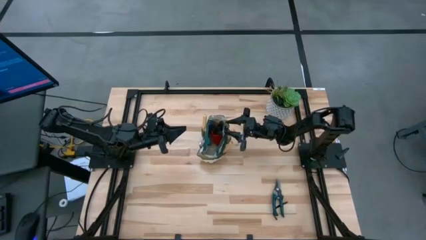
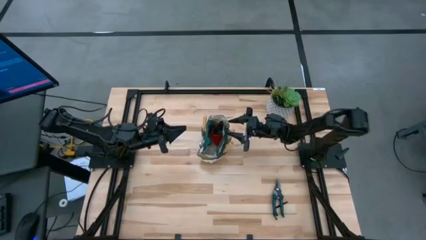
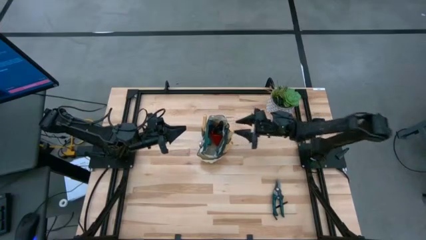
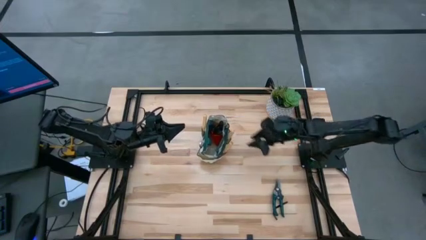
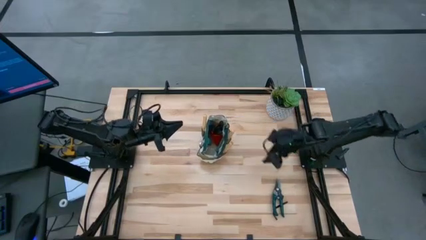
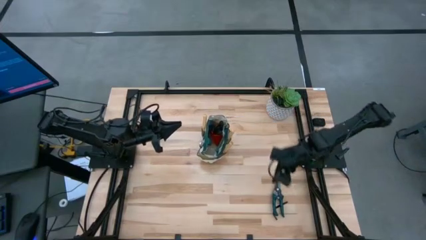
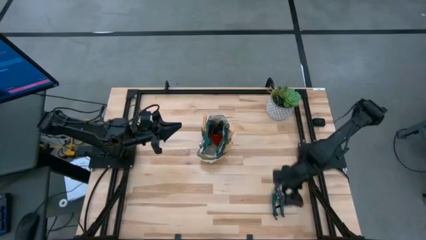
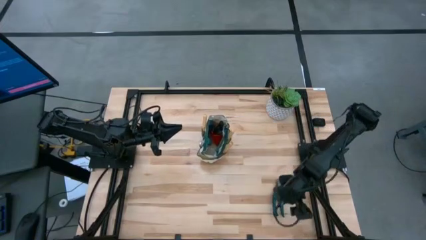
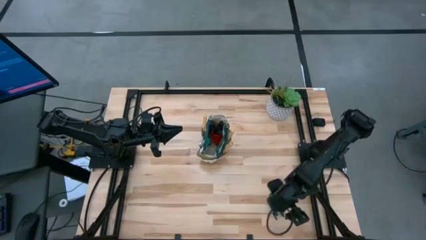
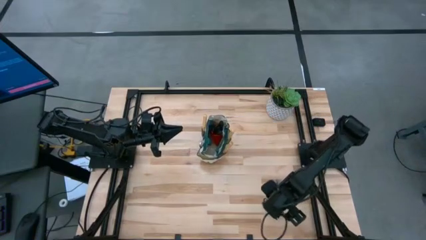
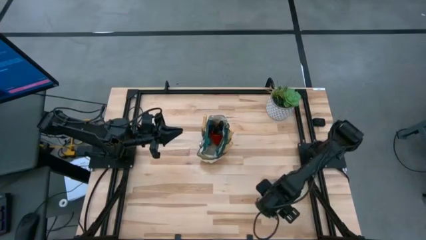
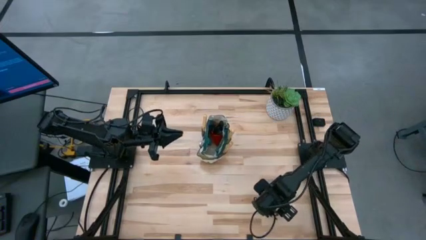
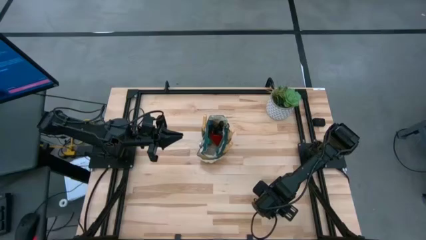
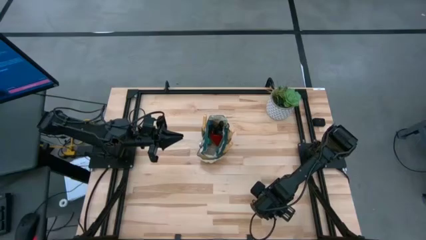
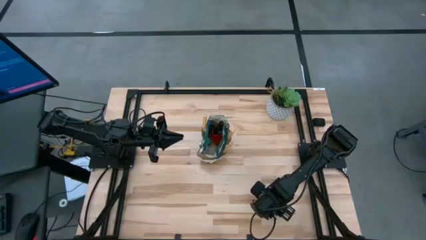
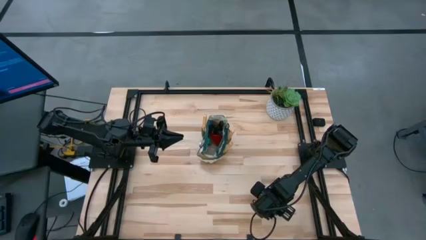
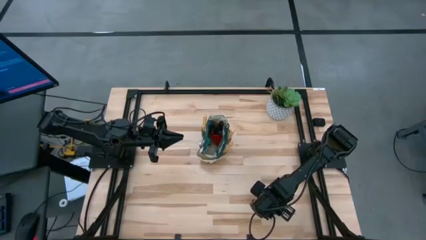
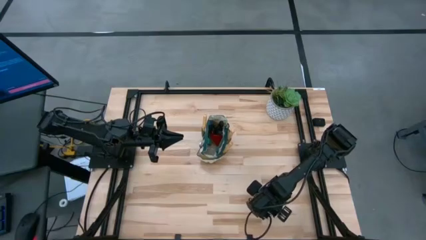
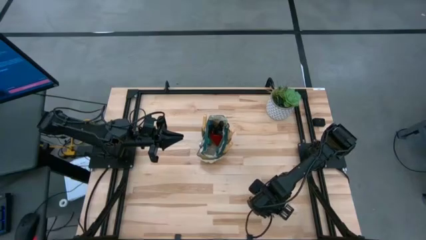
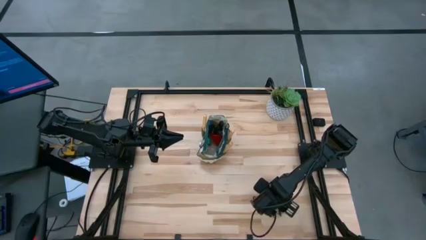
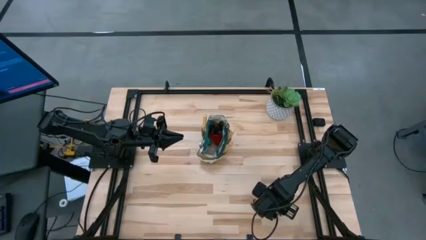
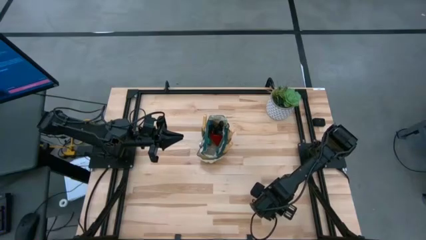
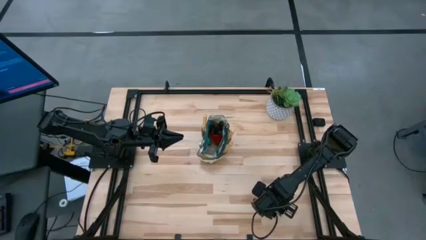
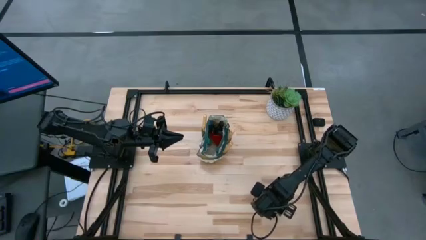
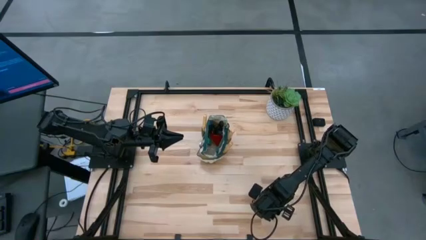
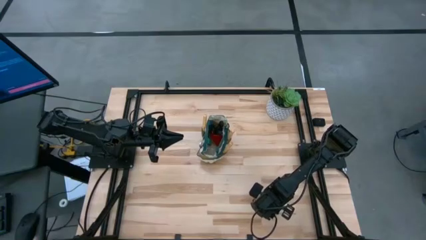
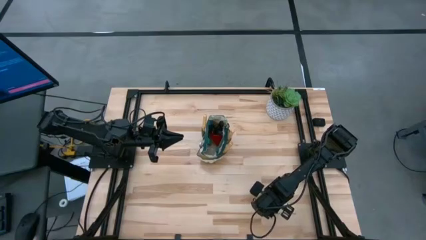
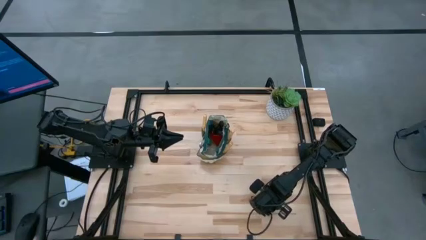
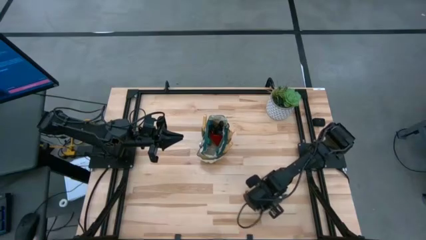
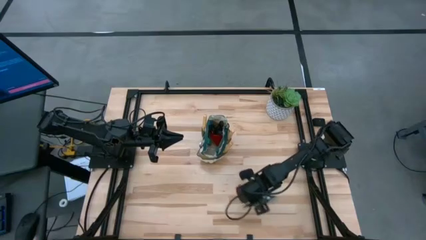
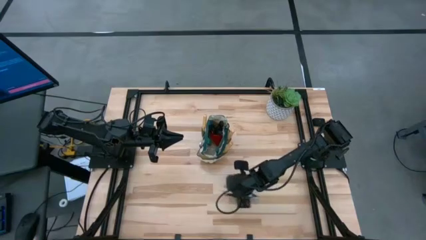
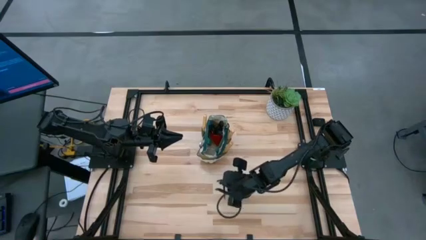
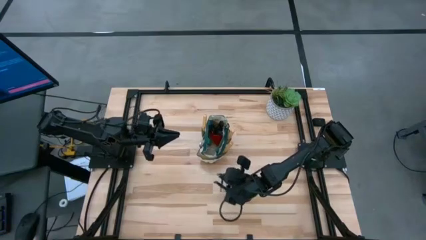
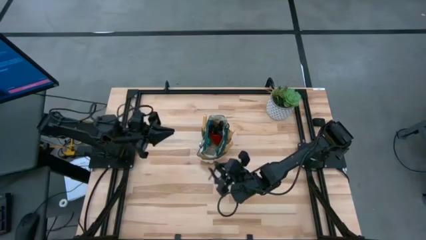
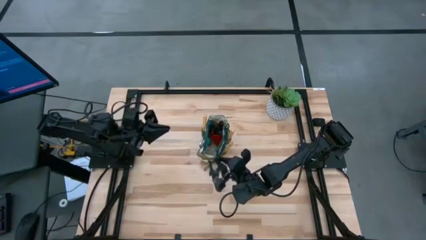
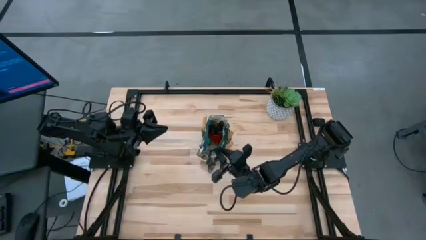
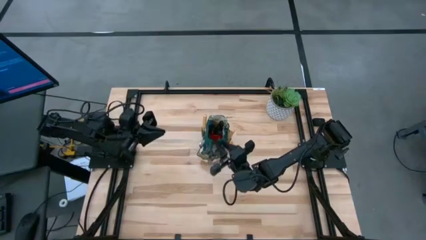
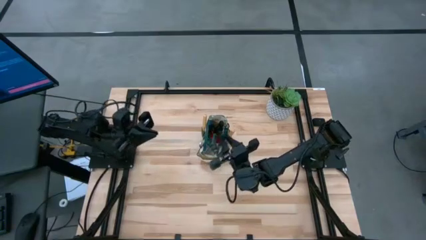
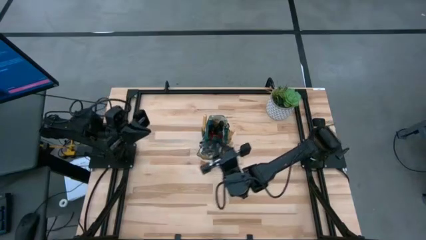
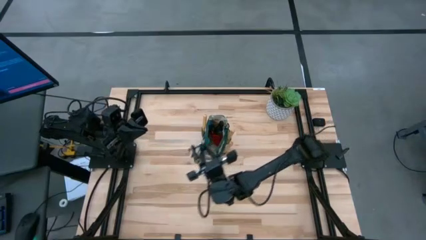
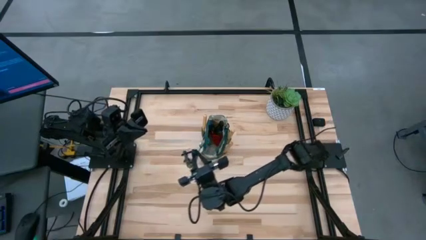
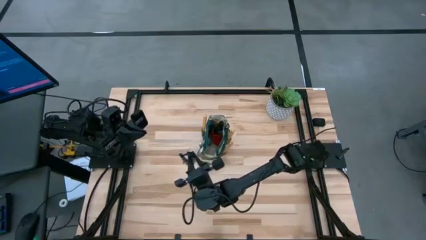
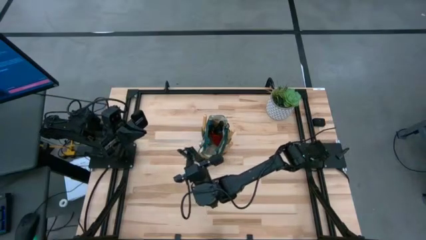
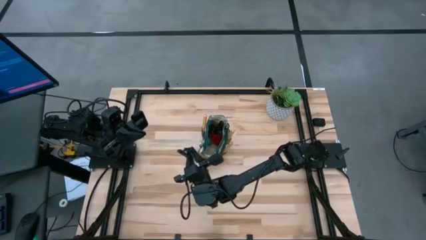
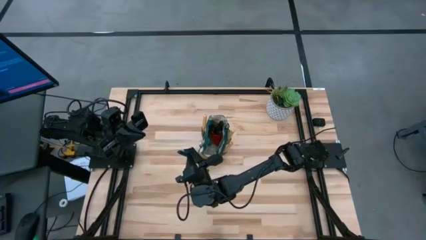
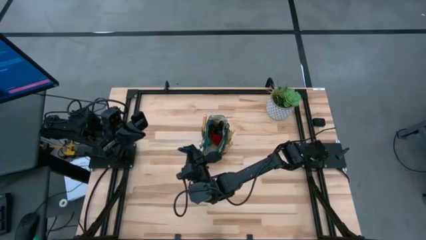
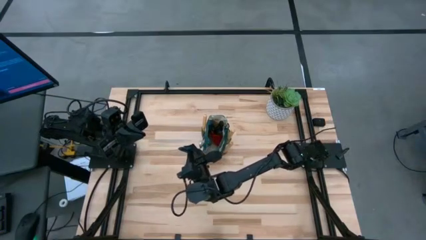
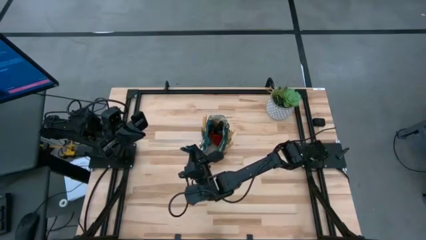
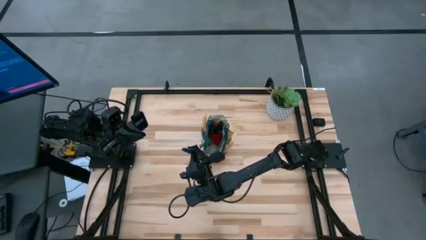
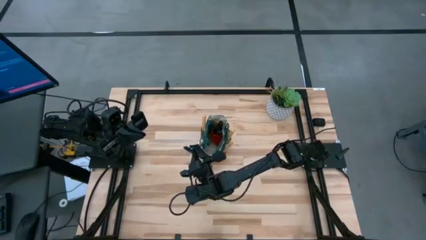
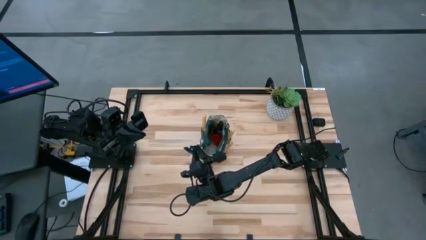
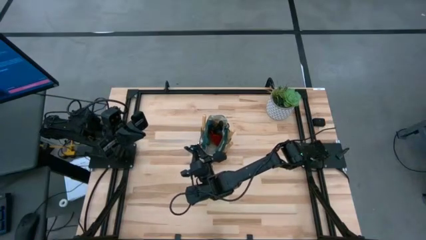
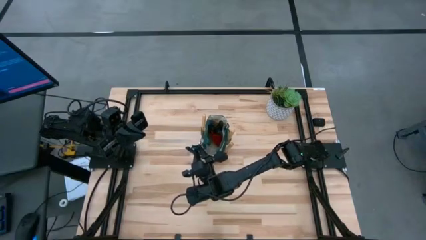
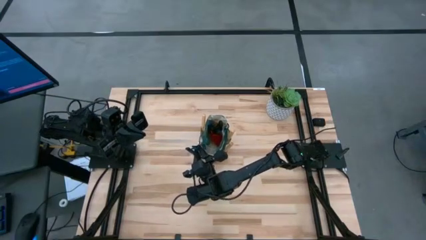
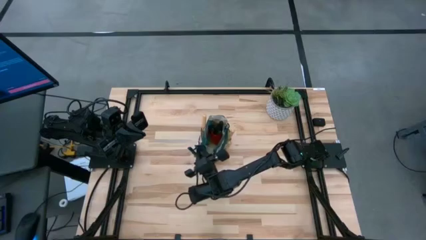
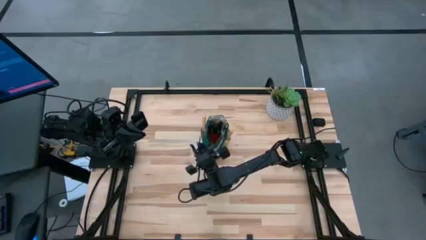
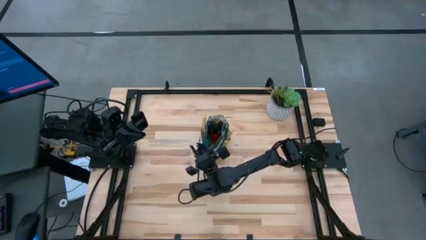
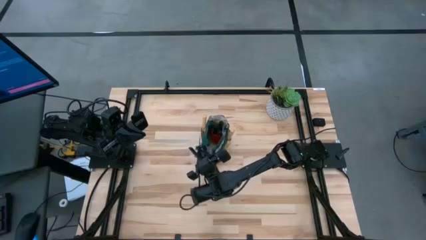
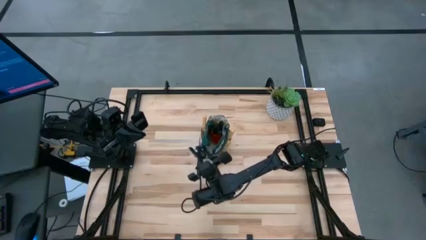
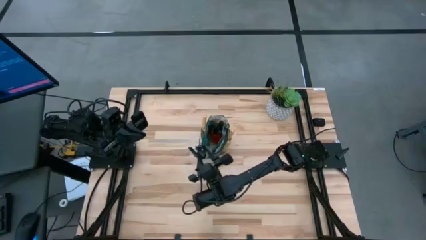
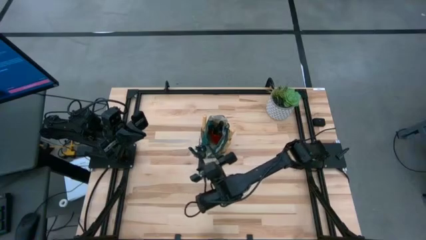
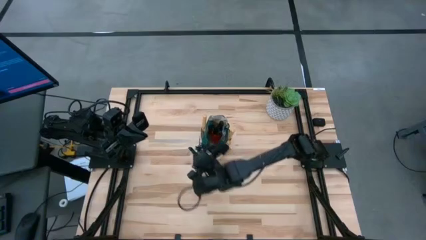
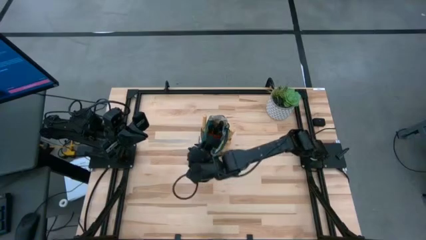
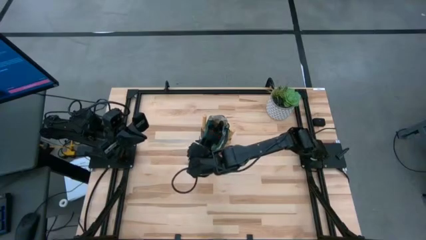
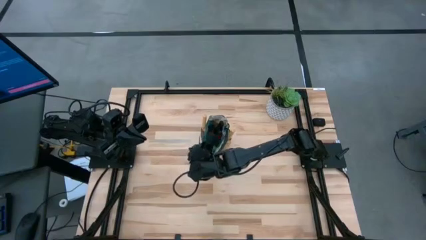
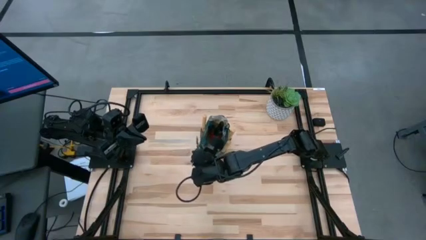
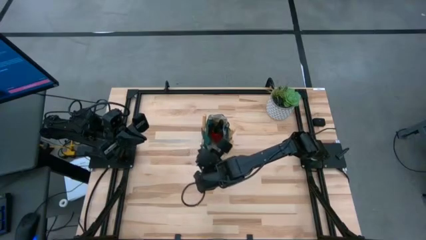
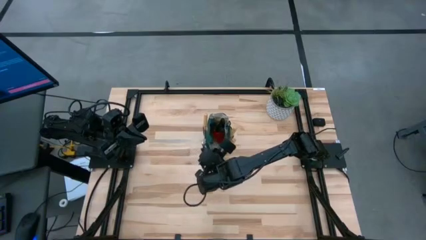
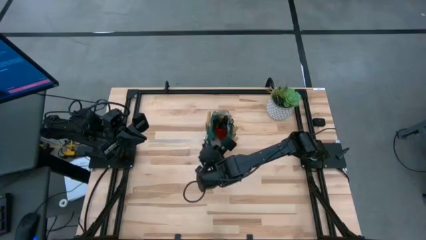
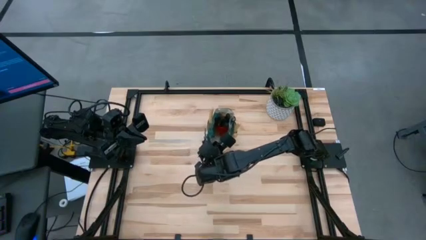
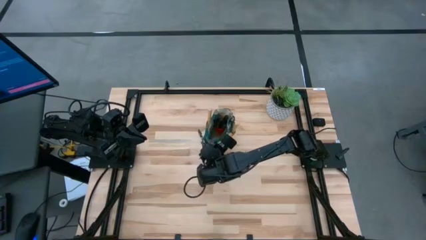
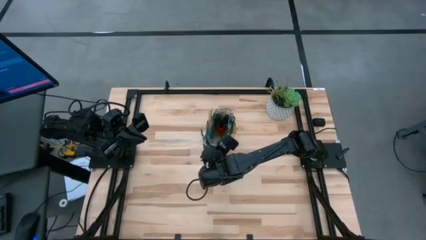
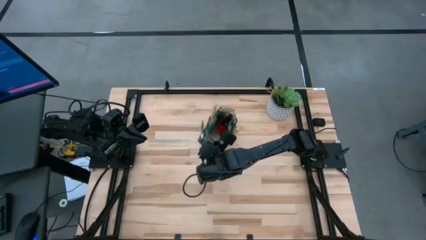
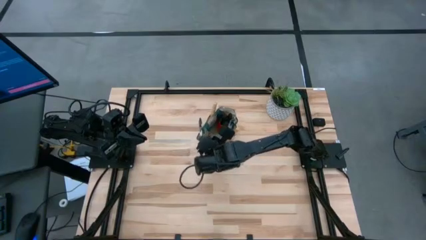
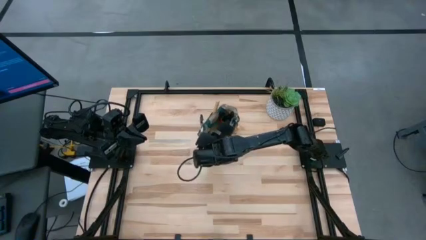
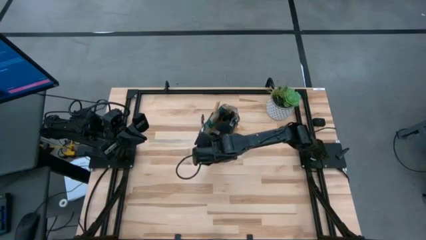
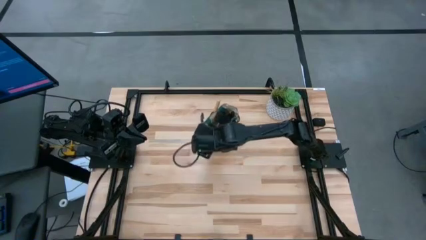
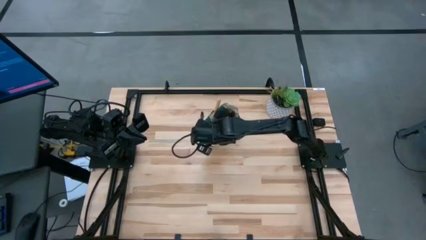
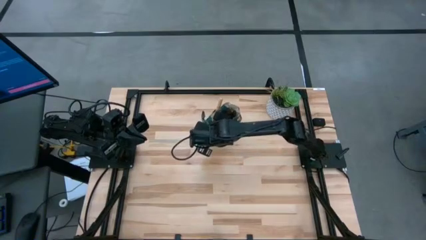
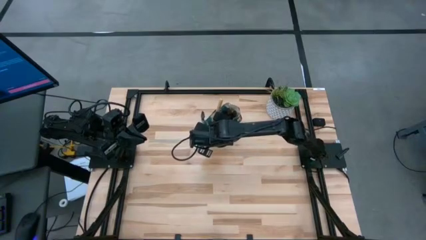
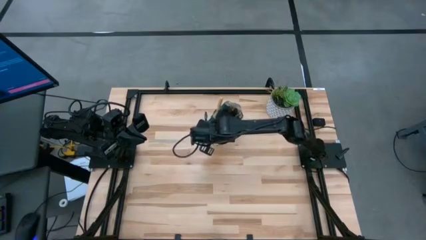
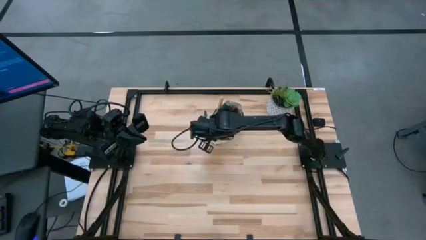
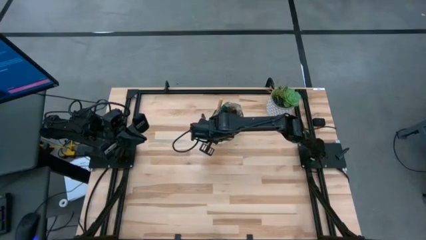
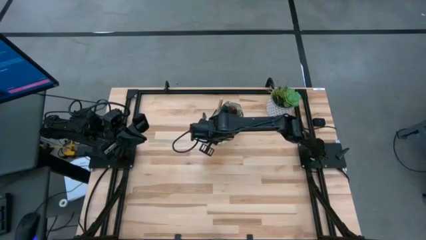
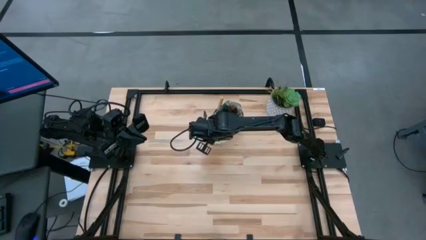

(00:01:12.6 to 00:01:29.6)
Task: Pick & Place Garden tools in Gardening bag
Put the green shear scissors into the gardening bag
